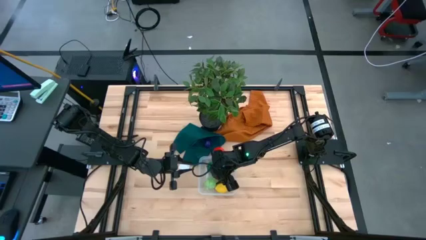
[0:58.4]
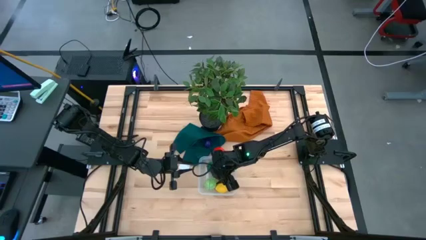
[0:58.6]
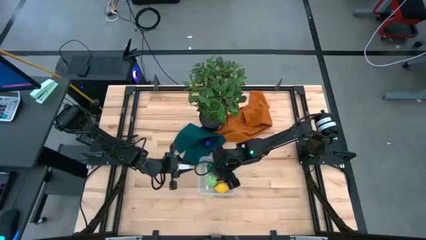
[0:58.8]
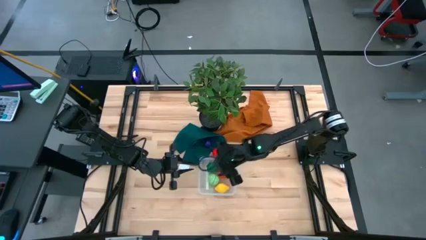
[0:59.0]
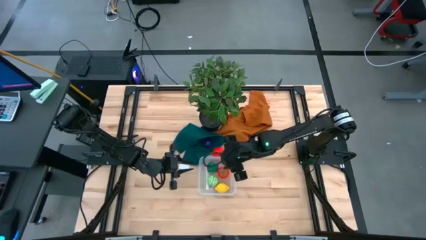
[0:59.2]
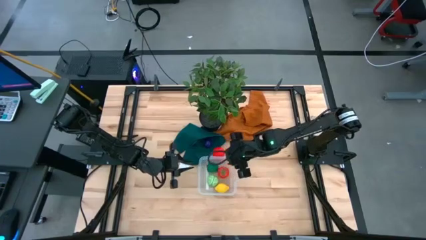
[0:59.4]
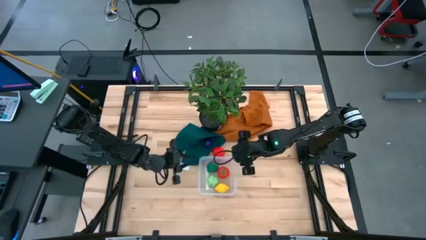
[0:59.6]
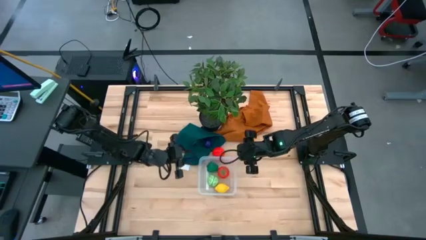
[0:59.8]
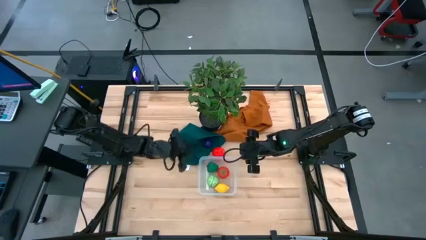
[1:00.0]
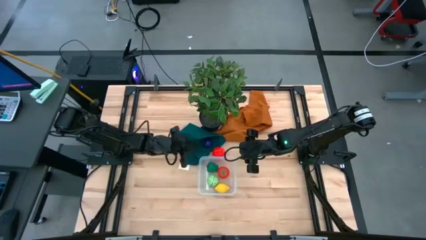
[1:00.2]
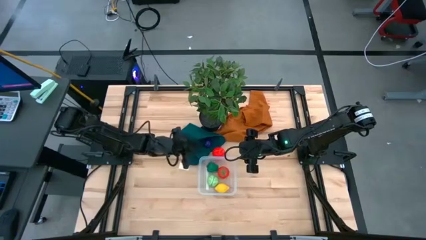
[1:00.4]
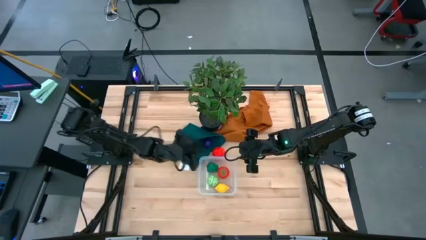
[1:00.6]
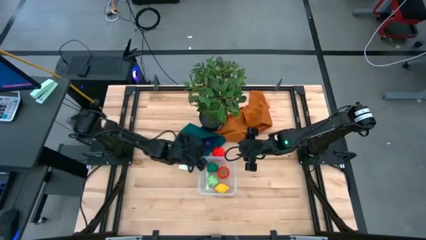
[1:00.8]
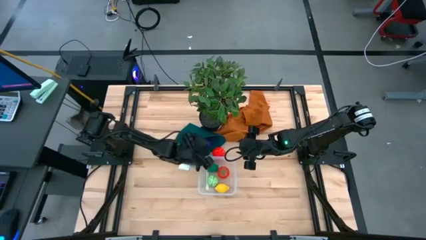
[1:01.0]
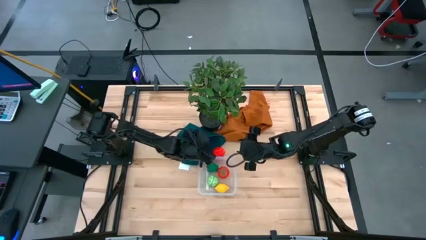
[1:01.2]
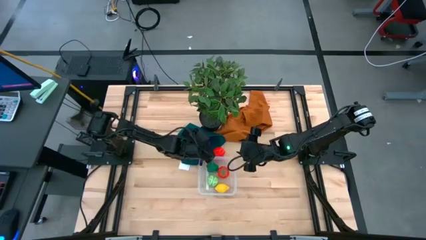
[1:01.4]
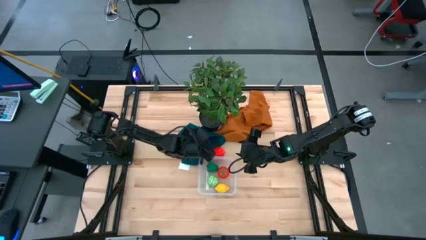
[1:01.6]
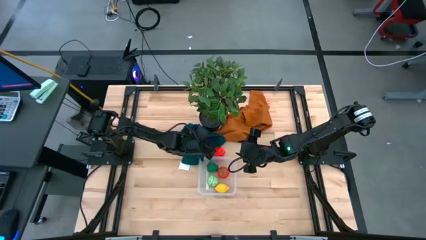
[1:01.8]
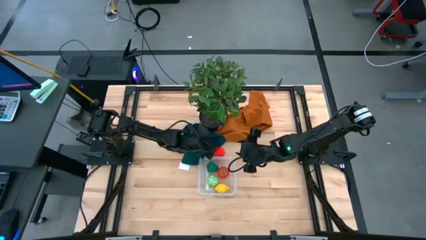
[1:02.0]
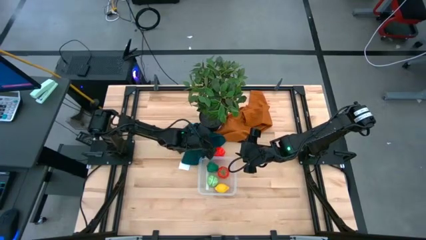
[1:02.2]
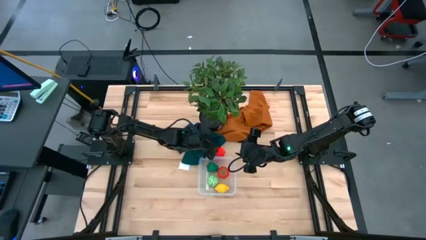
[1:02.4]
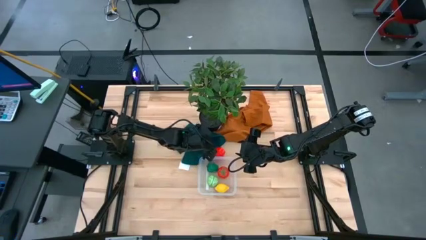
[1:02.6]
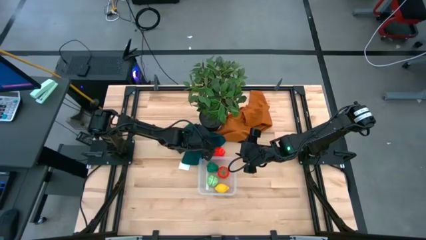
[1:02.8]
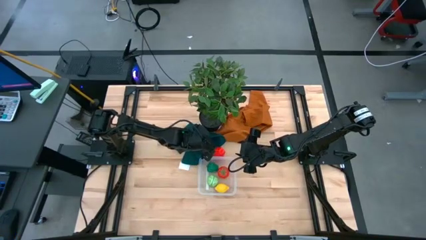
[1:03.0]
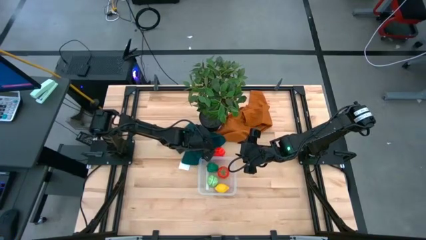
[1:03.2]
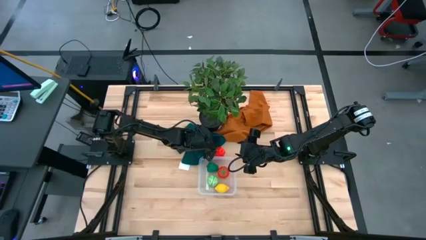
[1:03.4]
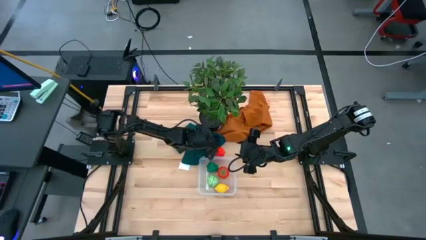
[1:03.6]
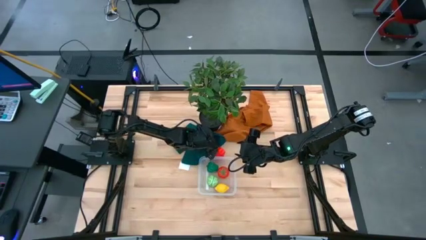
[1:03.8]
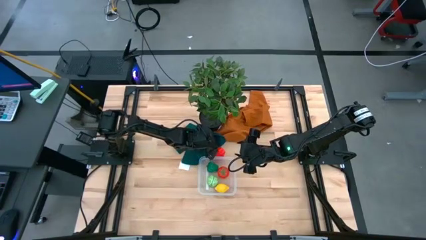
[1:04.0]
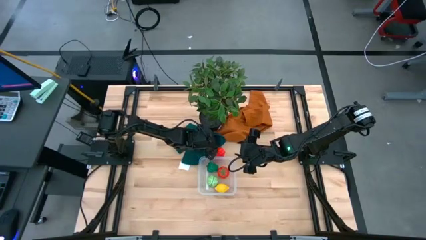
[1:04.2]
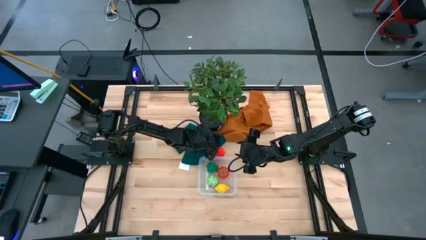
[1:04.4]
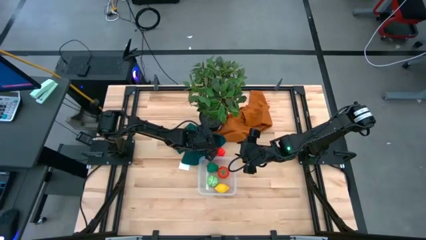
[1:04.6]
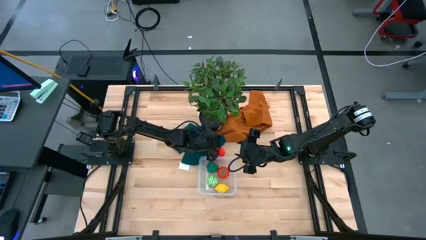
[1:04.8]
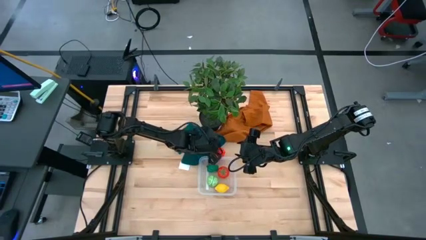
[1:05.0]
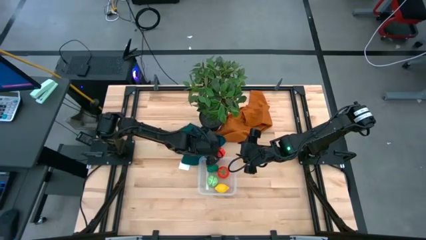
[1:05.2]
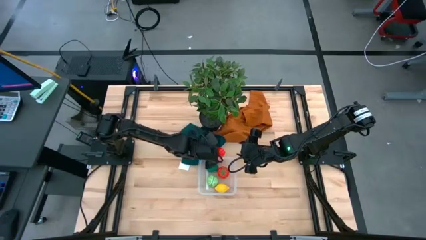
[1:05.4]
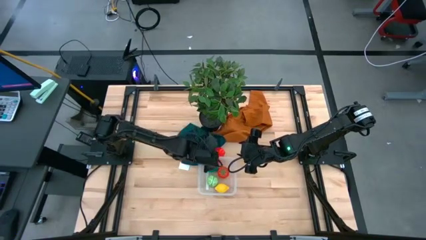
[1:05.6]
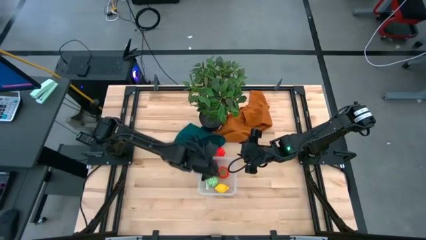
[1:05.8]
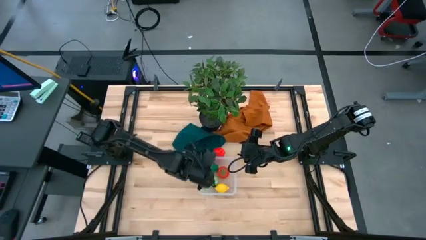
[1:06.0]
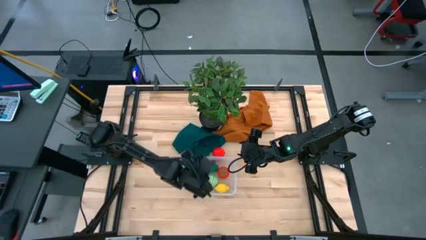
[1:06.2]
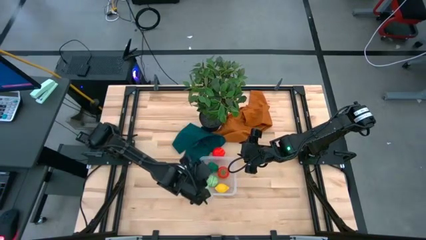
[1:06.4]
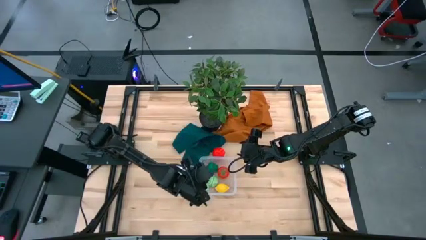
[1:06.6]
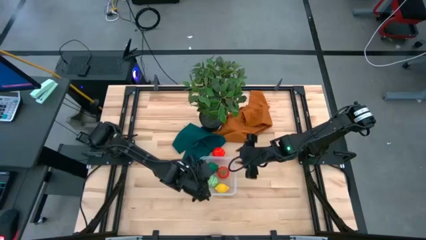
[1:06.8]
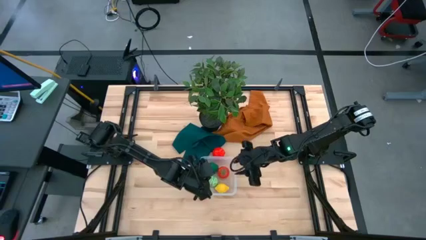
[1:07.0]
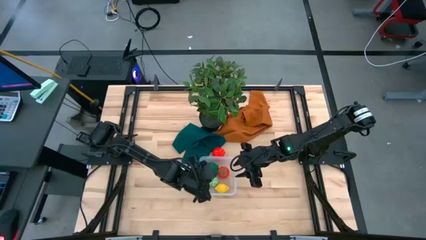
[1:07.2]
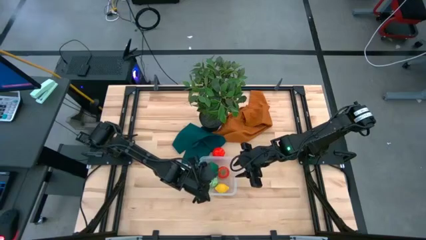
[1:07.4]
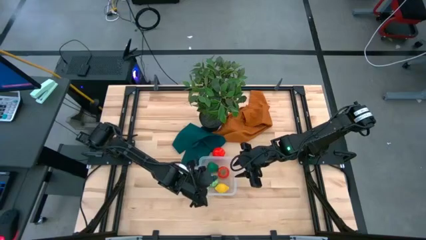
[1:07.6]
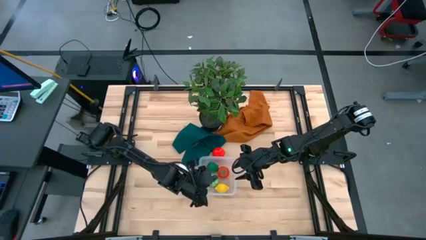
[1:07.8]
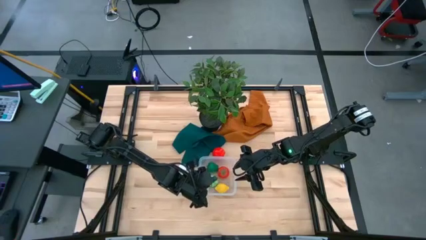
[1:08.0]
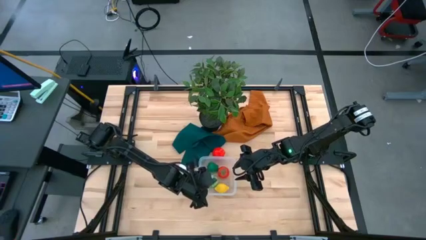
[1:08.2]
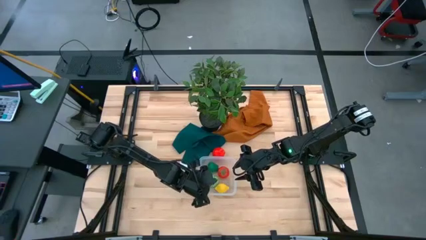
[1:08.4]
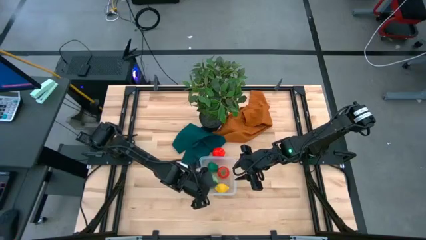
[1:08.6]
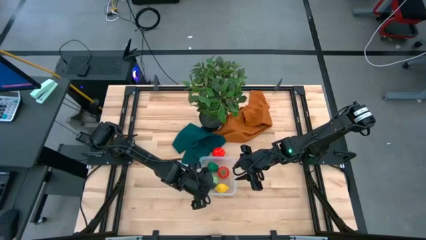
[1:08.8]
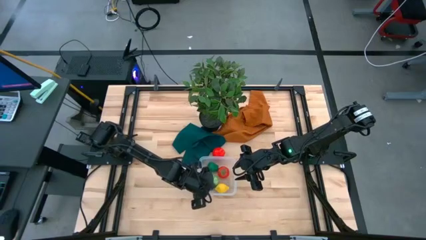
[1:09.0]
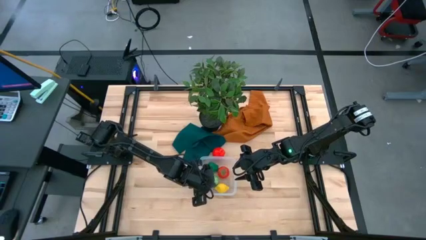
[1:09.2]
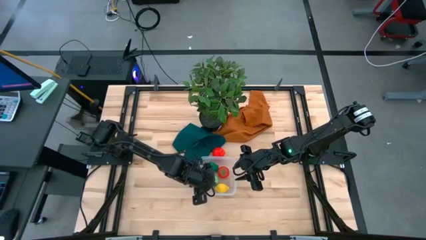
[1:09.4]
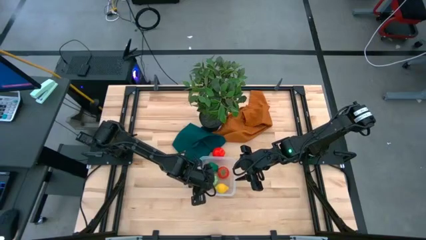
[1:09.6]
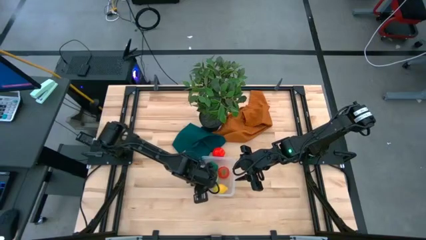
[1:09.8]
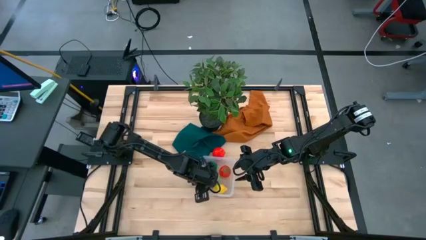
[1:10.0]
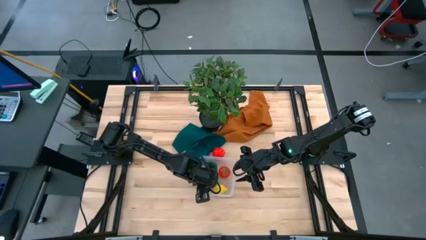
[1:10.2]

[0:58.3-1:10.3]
Task: Pick and placing Produce into tupperware
Put the eggplant into the transparent bin
